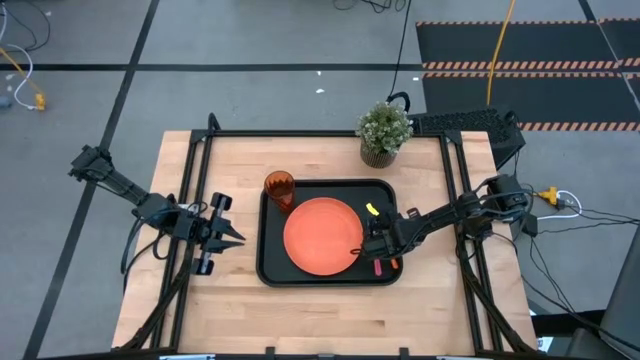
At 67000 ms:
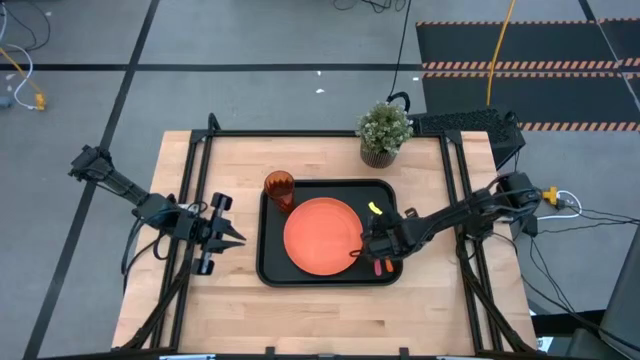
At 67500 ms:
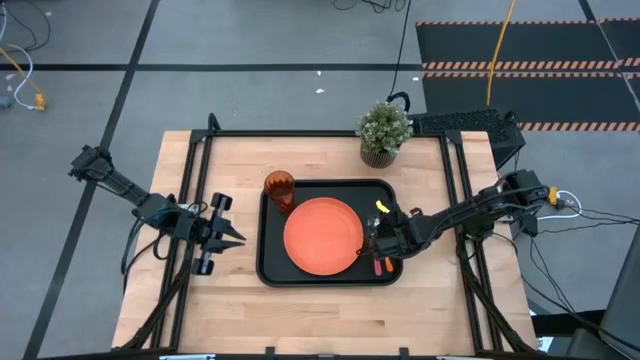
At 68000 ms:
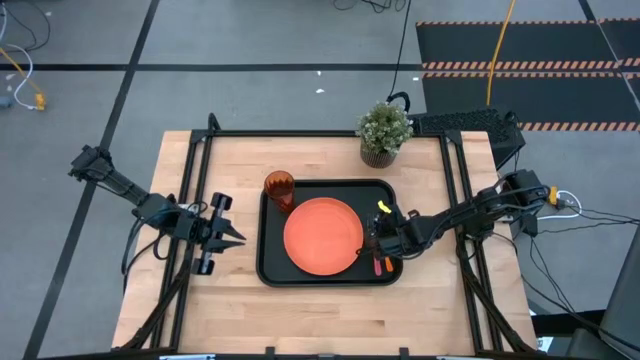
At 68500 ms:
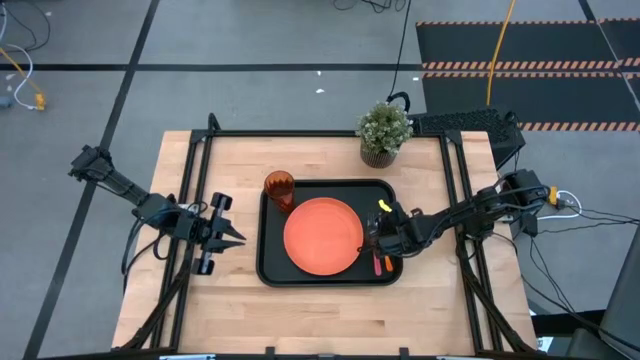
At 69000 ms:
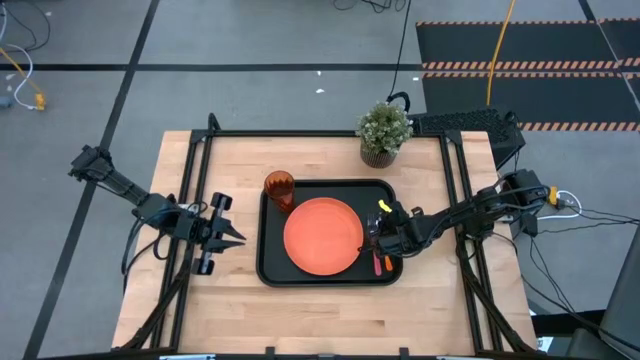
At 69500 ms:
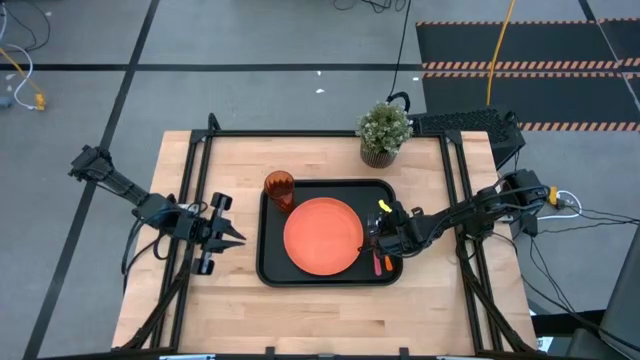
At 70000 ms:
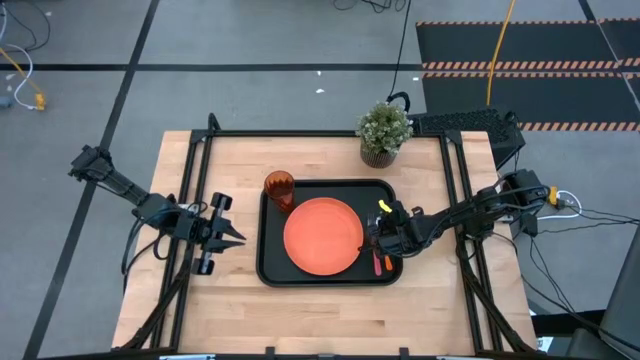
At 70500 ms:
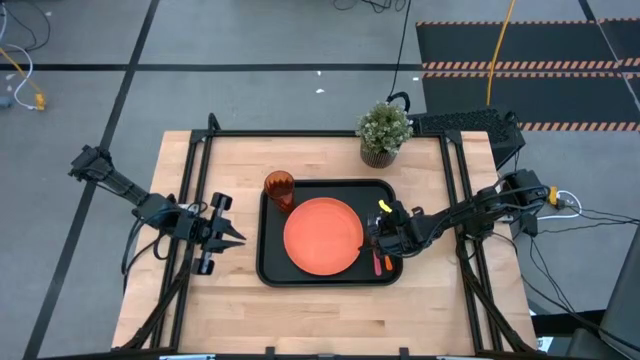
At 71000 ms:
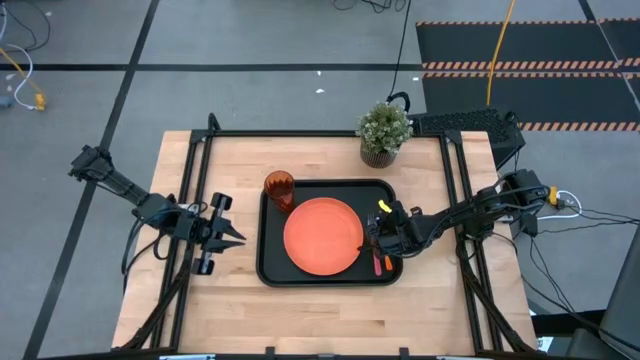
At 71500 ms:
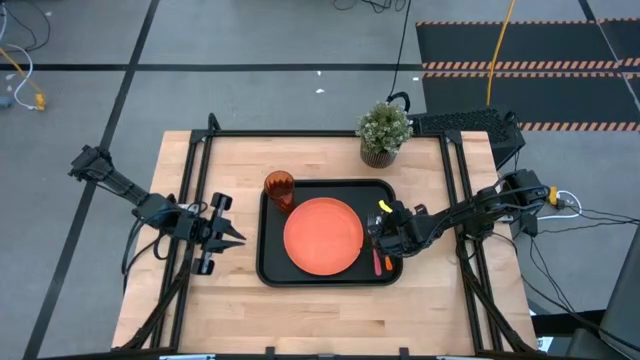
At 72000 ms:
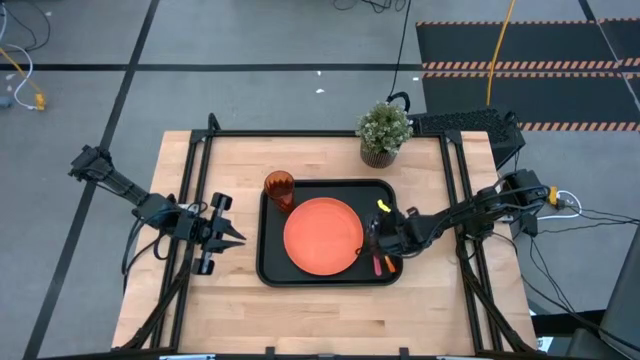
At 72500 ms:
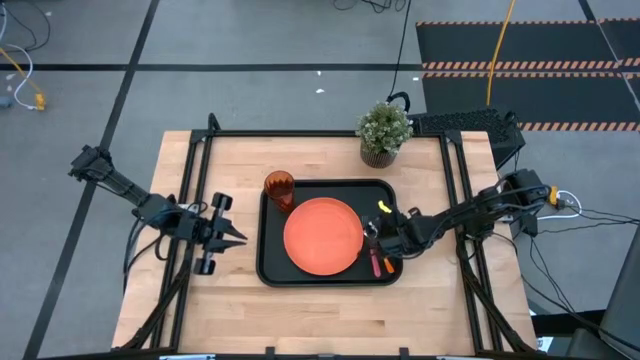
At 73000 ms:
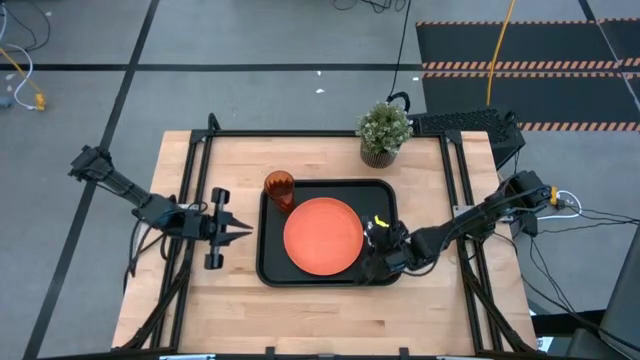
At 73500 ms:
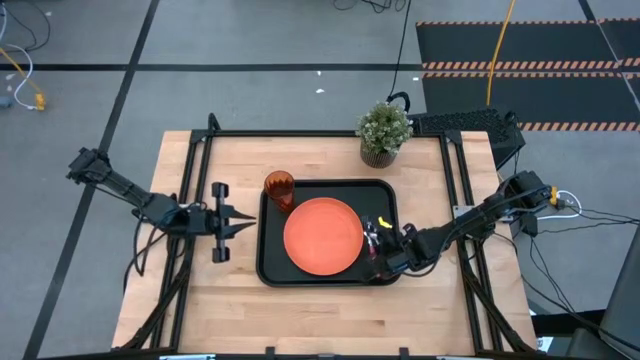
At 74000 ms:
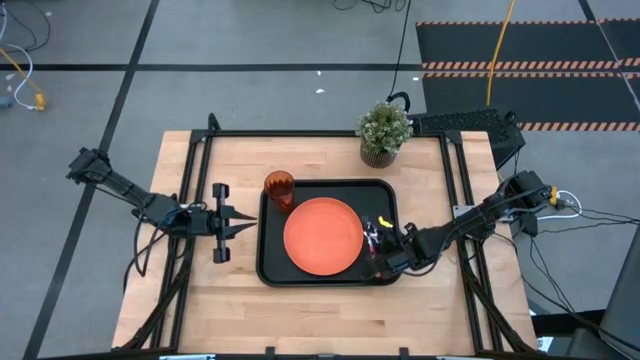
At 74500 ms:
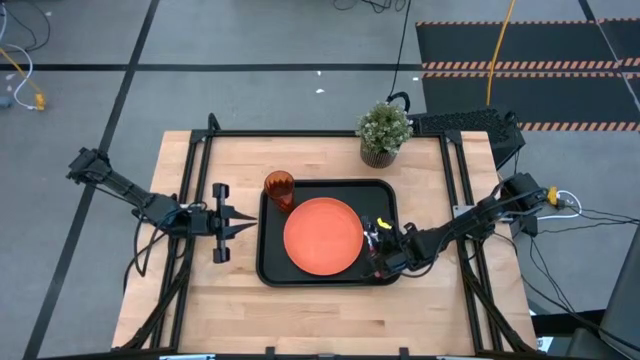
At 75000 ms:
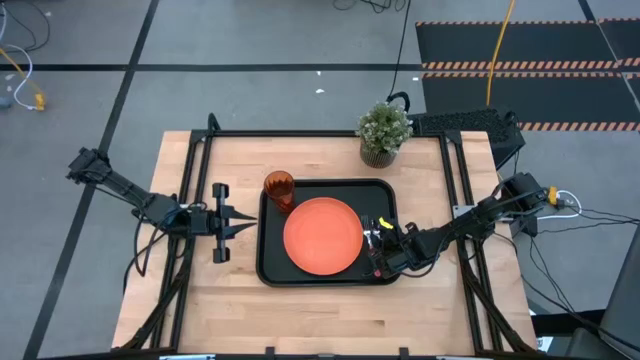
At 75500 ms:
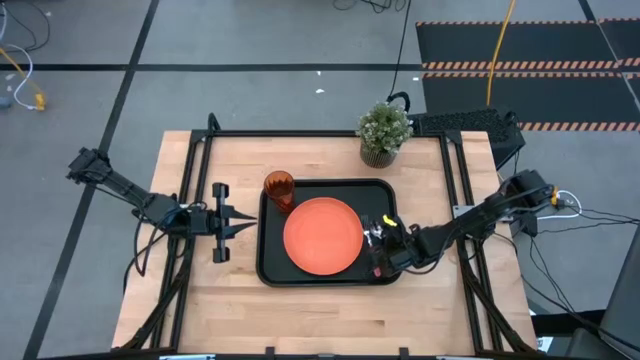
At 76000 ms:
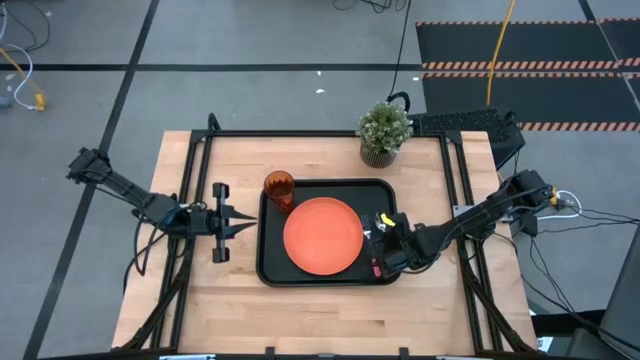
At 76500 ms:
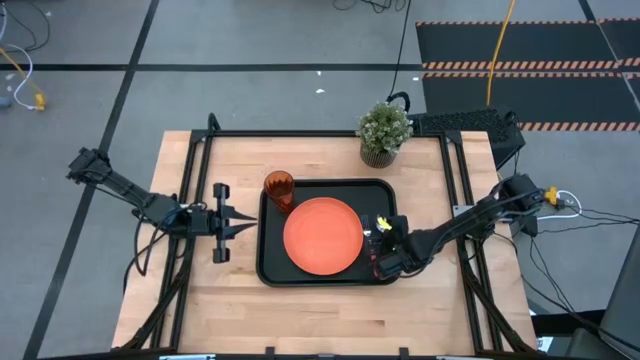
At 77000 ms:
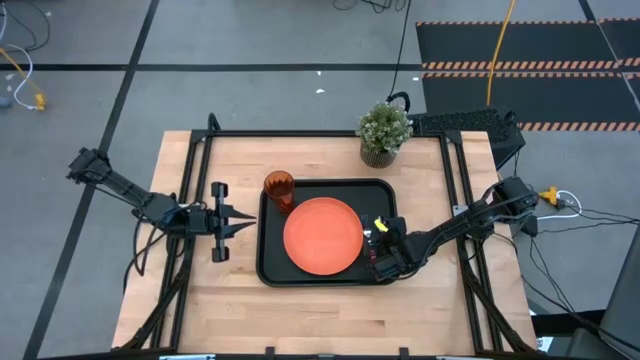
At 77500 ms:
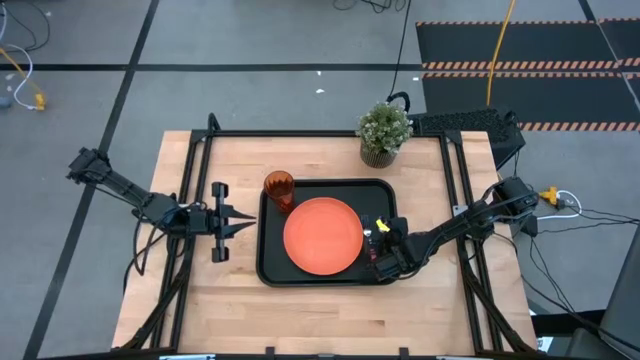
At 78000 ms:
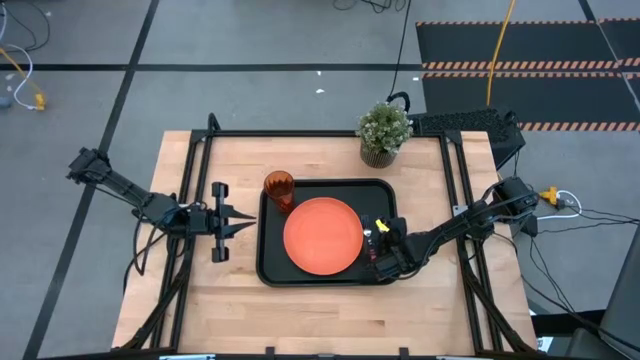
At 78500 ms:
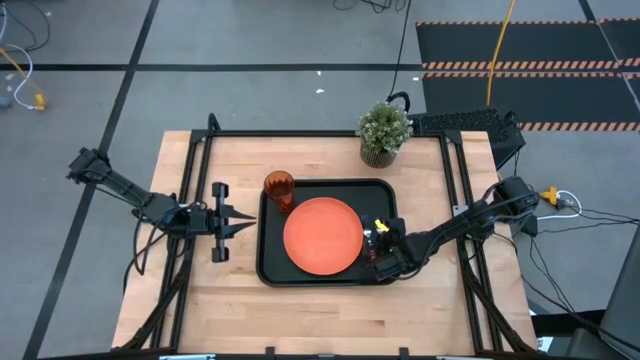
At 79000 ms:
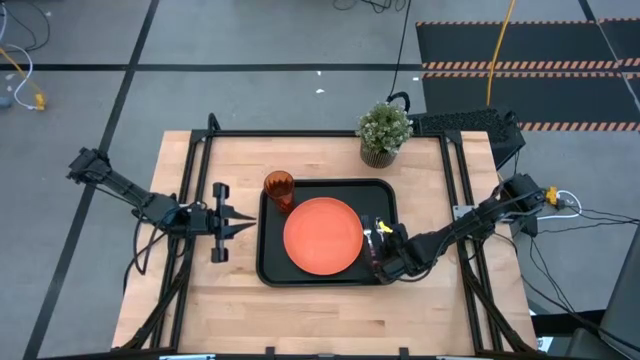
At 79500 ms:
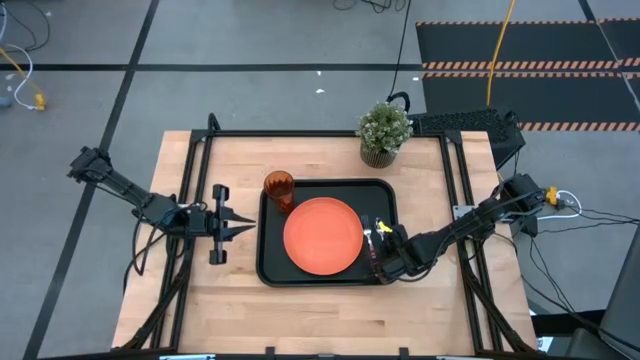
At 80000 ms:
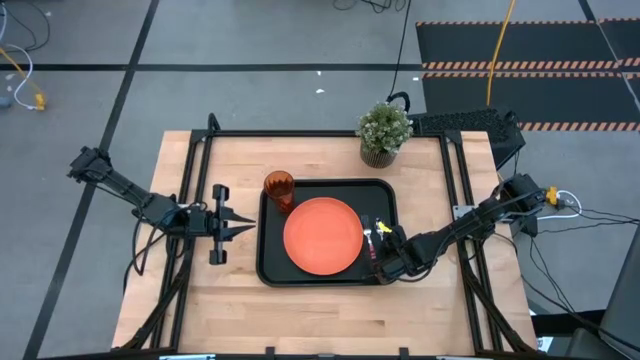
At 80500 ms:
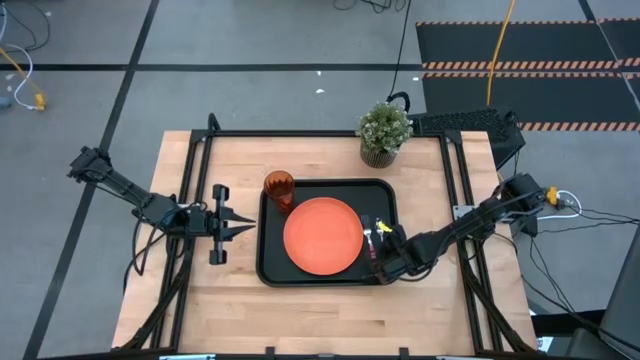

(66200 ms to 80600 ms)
Task: Pick and place plate/cup/fork/spoon on tray
Put the orange spoon on the black serving tray

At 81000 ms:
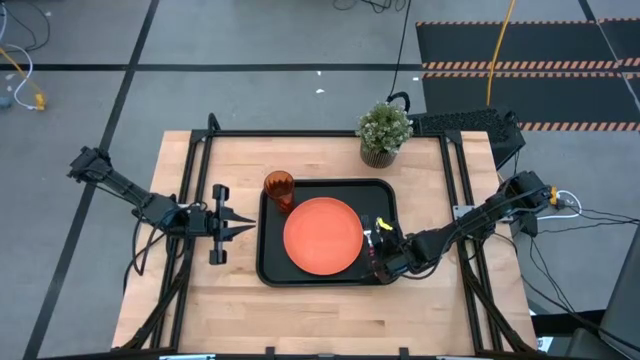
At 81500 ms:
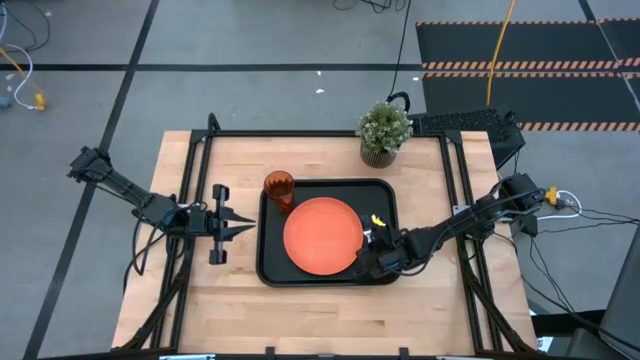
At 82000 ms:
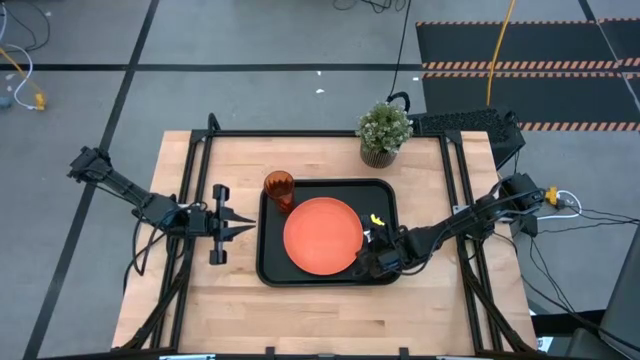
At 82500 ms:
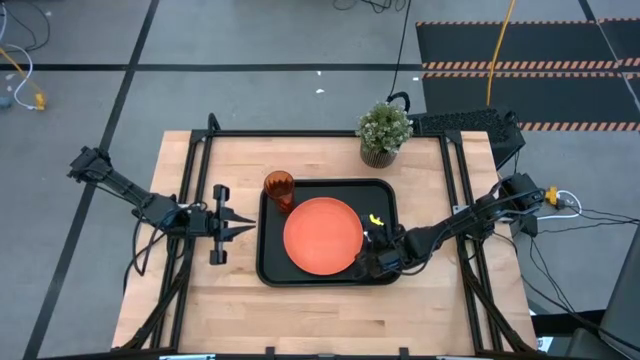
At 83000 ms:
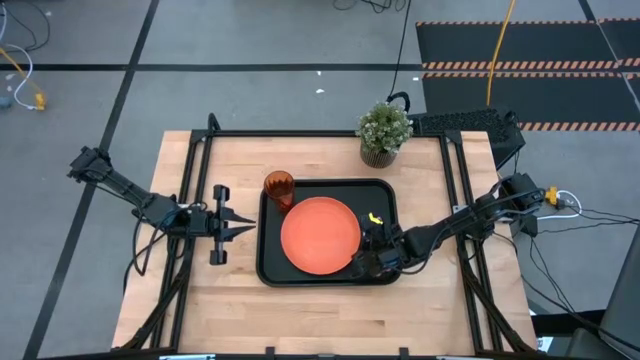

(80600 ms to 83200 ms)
Adjust the orange plate on the black serving tray

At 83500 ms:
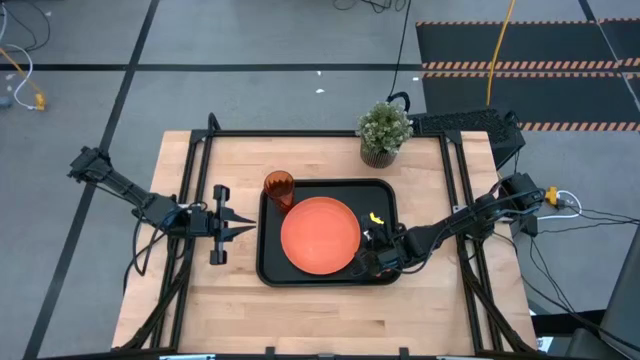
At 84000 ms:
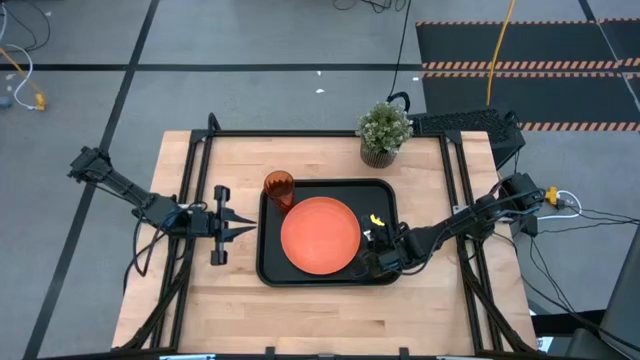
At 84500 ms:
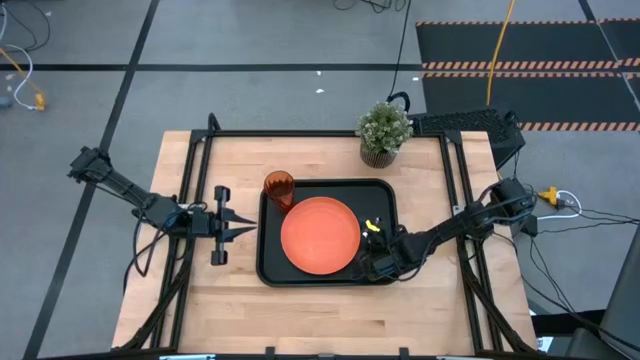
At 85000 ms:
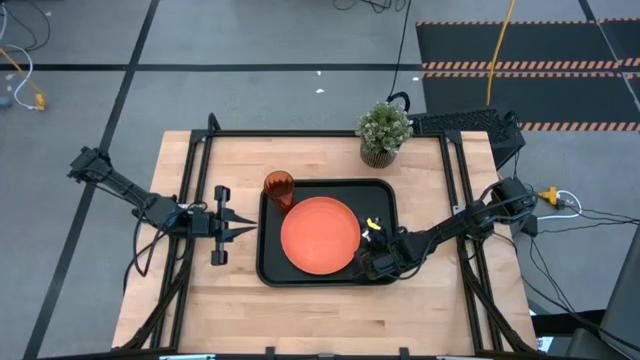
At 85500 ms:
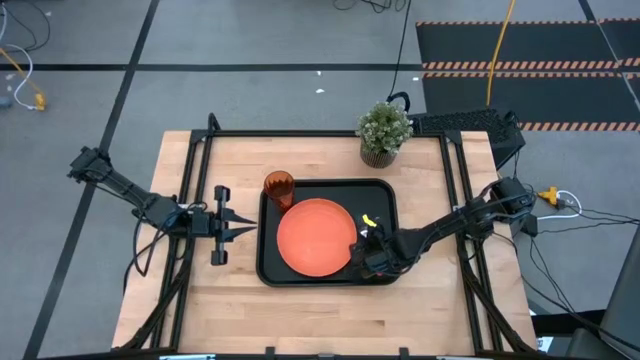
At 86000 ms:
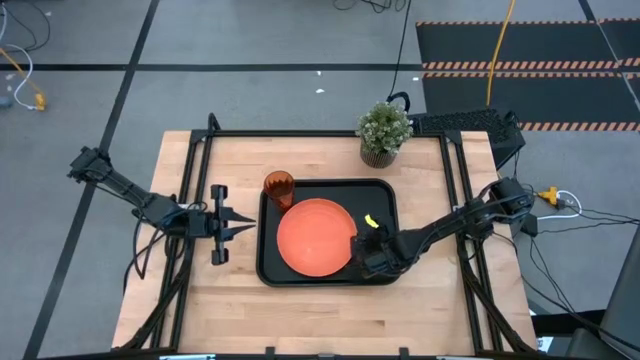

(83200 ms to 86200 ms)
Adjust the pink fork on the black serving tray

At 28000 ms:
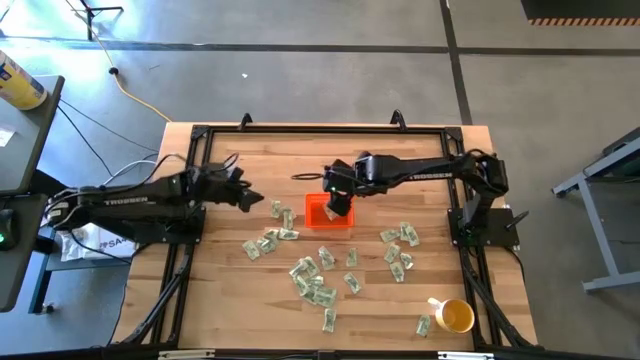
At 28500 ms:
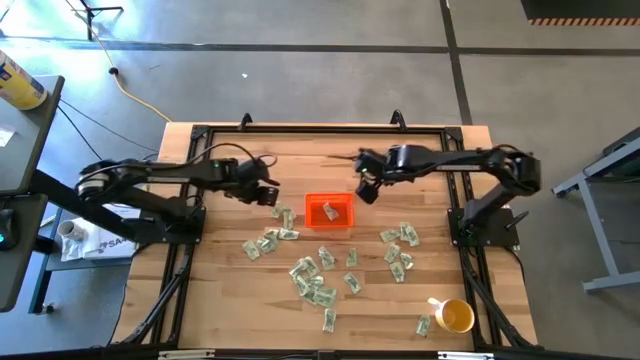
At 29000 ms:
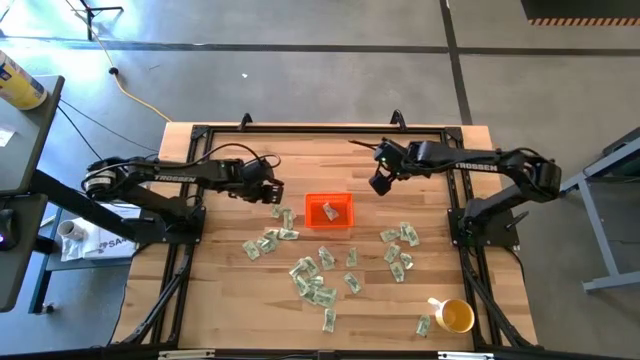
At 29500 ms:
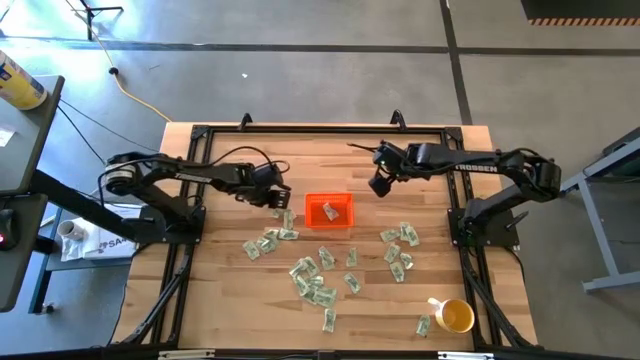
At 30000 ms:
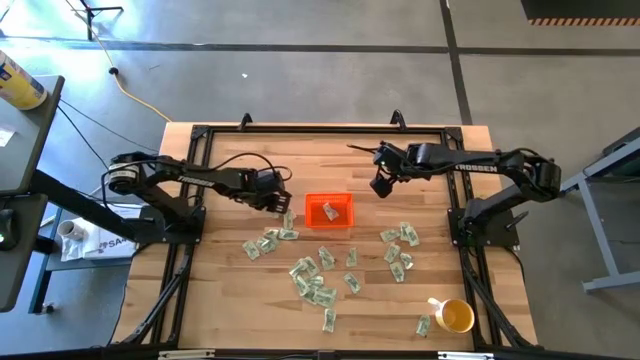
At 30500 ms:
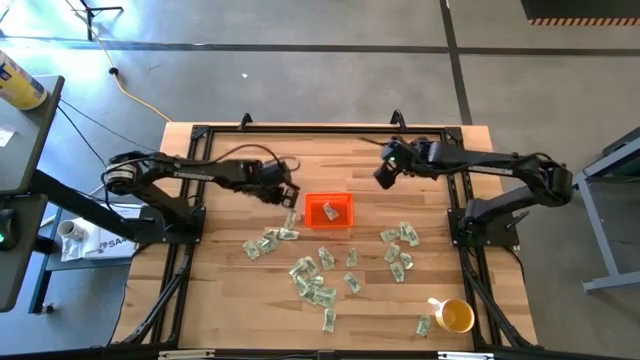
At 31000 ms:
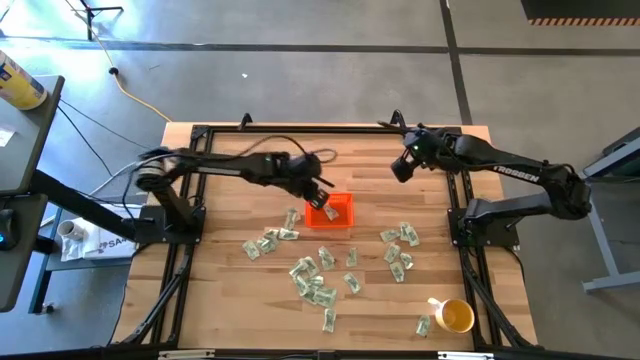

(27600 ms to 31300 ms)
Task: Pick and place Stevia / Truvia into bins
Put the stevia packet into the orange bin
